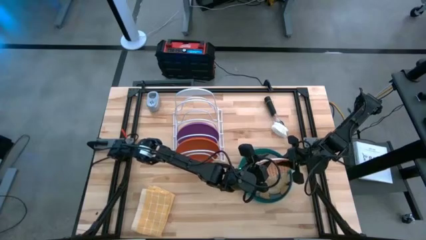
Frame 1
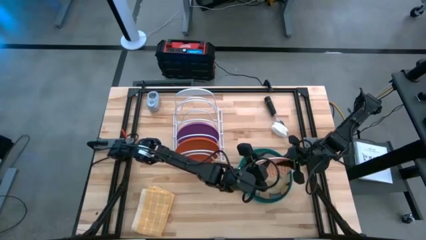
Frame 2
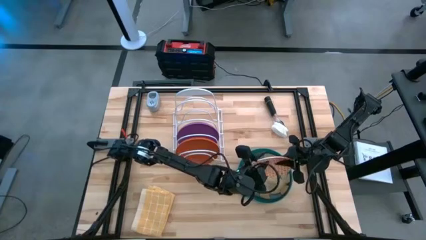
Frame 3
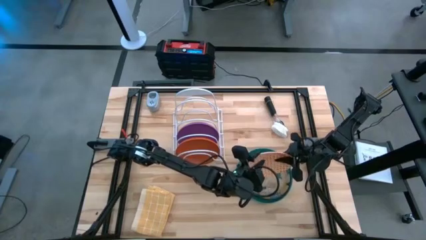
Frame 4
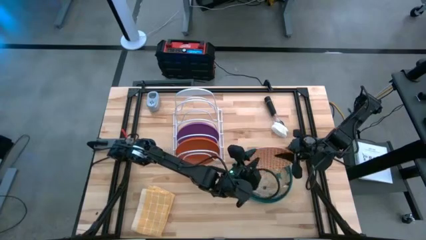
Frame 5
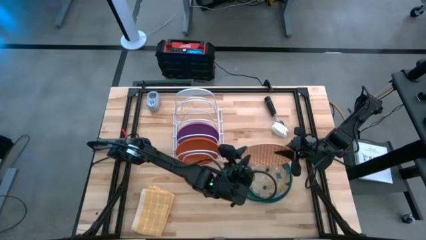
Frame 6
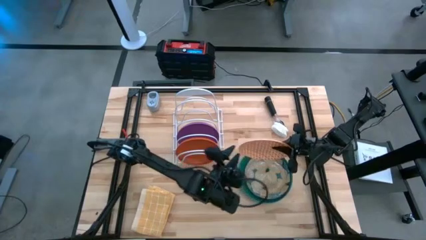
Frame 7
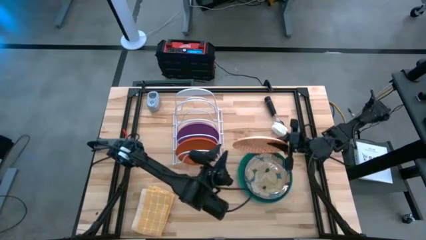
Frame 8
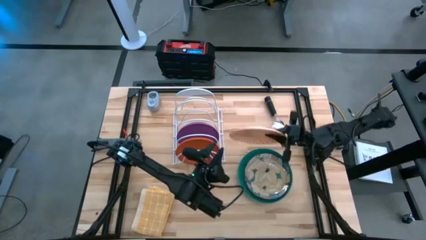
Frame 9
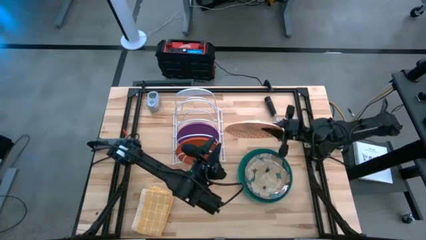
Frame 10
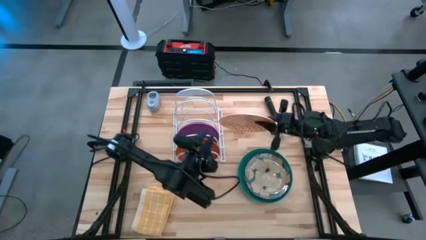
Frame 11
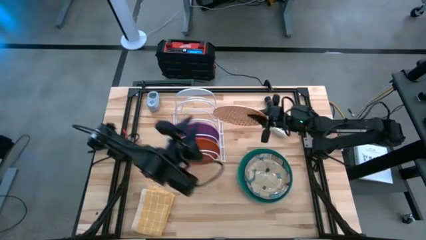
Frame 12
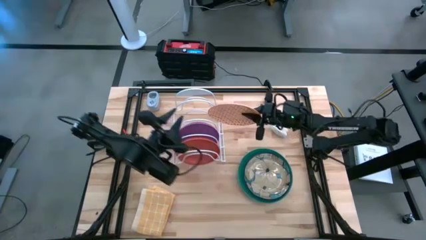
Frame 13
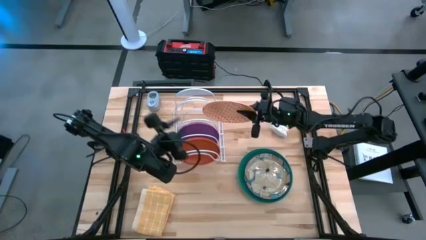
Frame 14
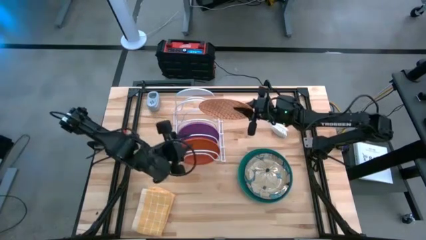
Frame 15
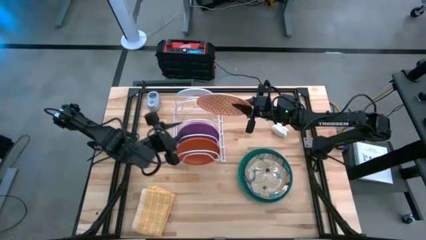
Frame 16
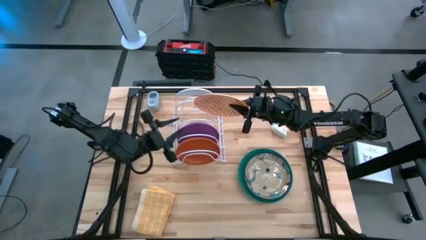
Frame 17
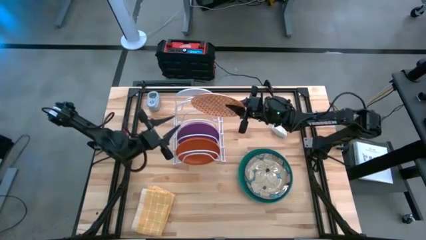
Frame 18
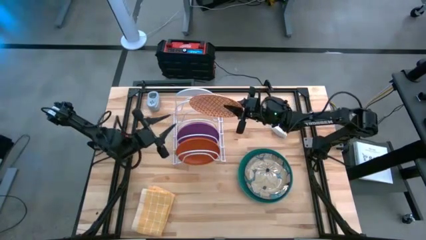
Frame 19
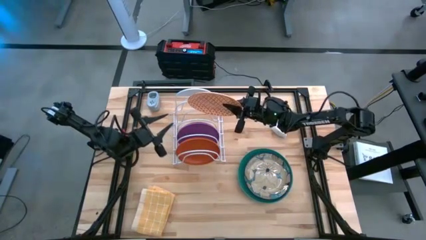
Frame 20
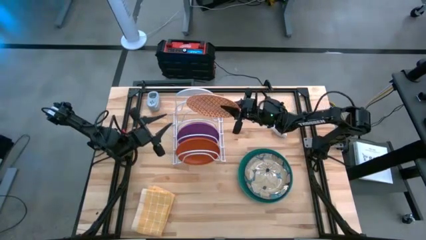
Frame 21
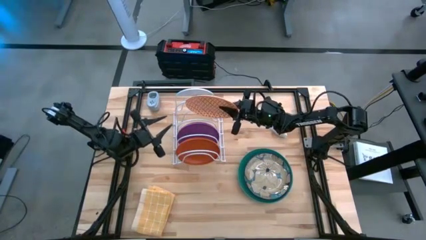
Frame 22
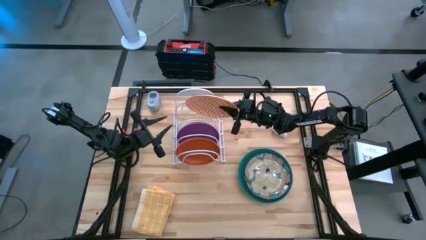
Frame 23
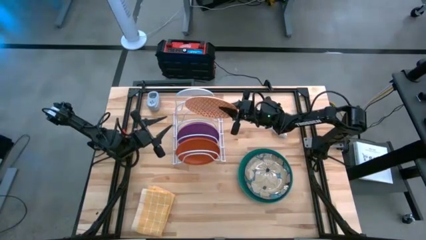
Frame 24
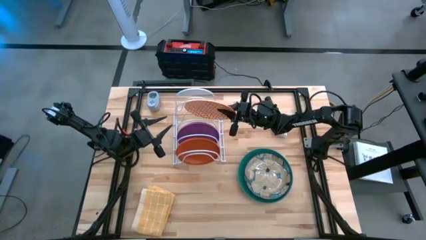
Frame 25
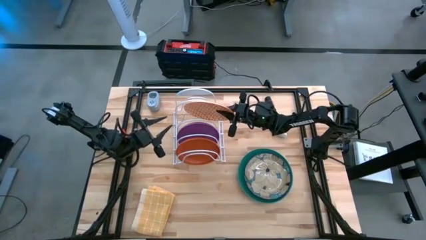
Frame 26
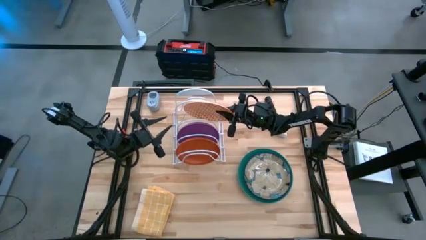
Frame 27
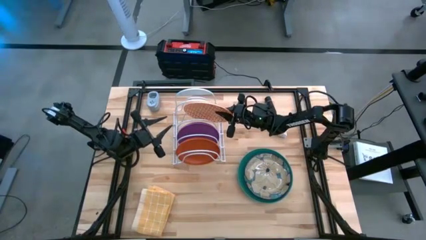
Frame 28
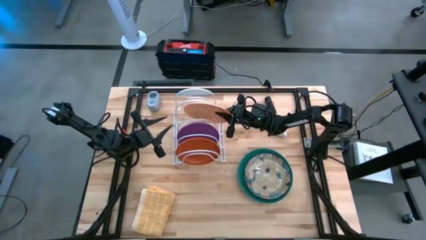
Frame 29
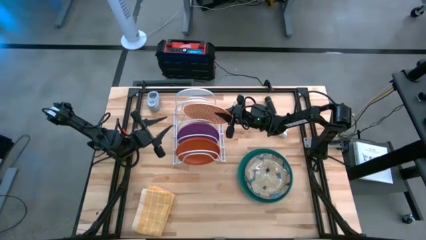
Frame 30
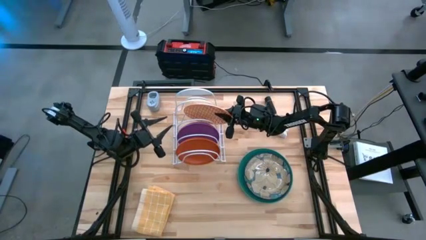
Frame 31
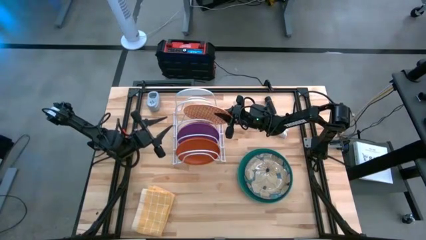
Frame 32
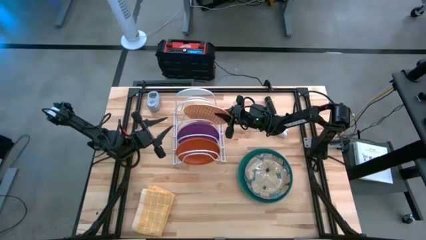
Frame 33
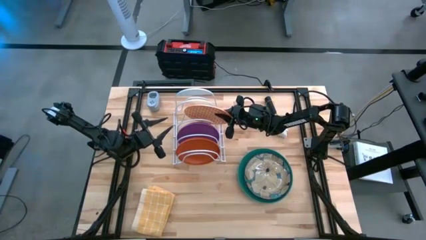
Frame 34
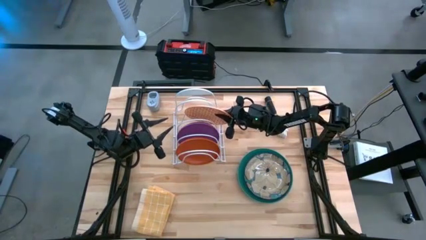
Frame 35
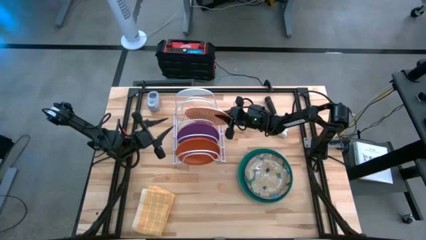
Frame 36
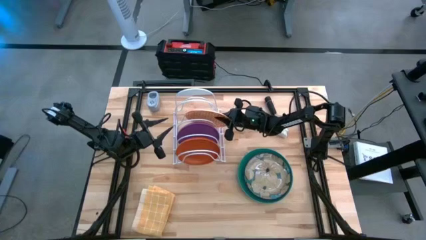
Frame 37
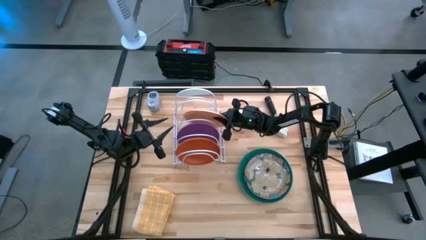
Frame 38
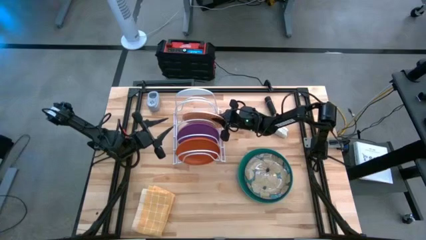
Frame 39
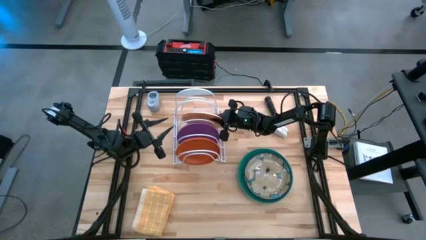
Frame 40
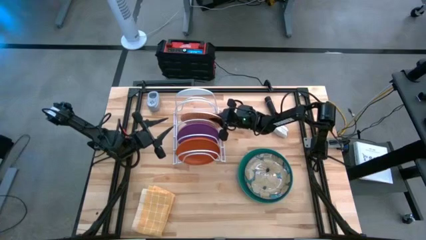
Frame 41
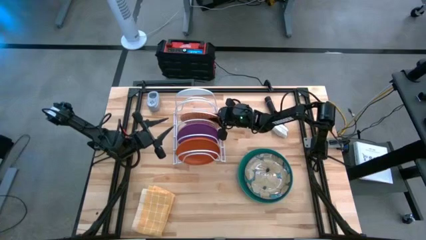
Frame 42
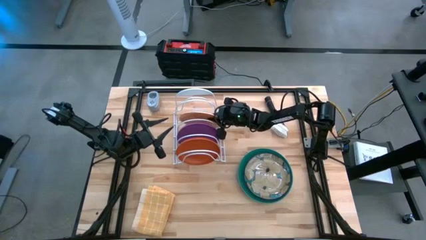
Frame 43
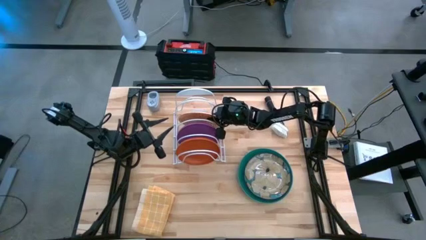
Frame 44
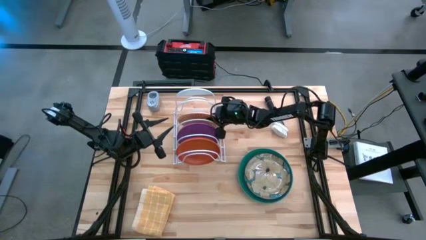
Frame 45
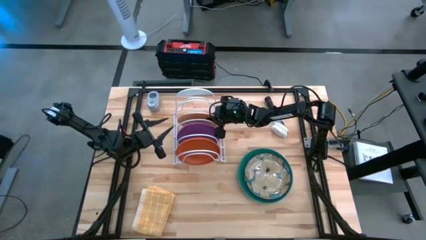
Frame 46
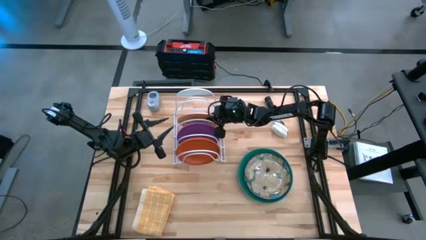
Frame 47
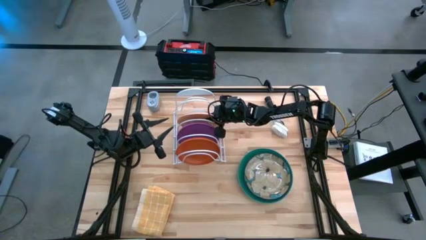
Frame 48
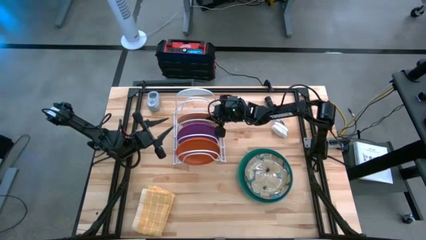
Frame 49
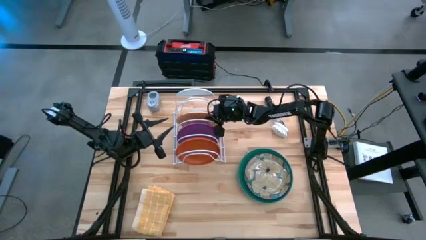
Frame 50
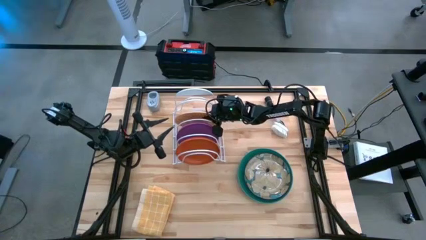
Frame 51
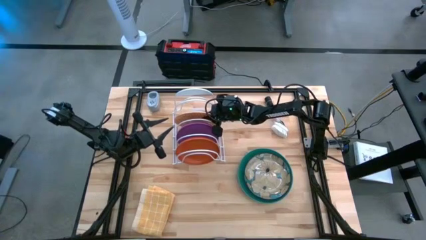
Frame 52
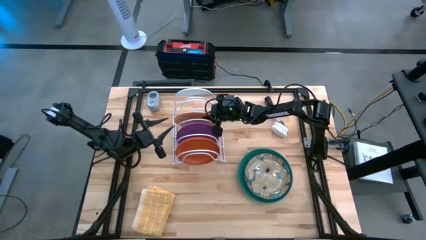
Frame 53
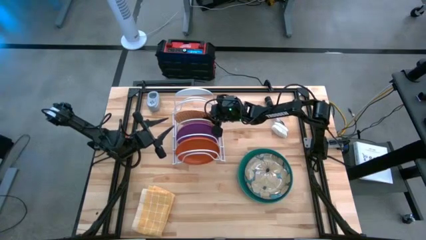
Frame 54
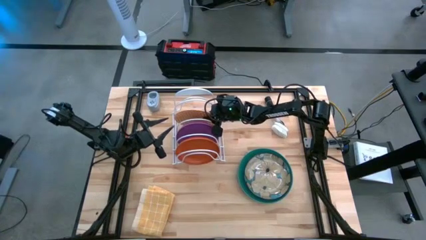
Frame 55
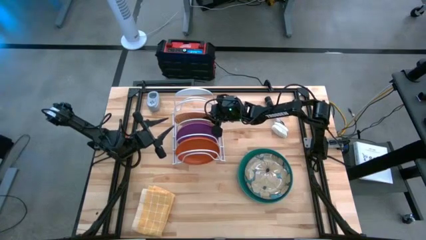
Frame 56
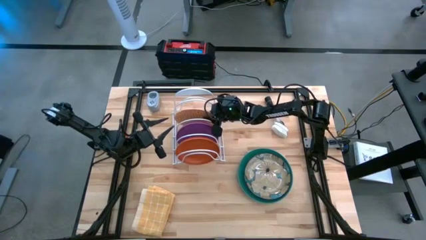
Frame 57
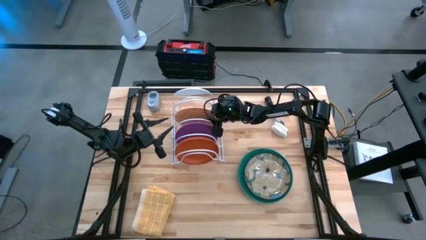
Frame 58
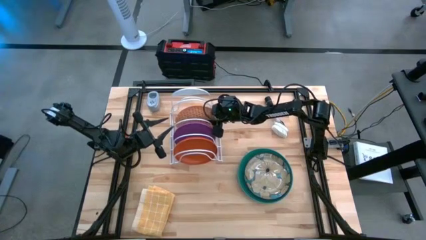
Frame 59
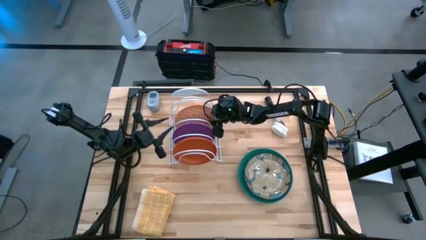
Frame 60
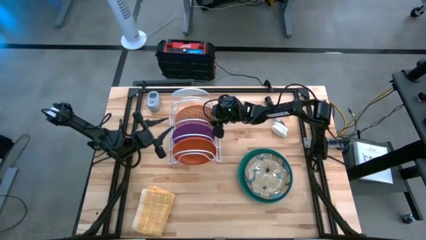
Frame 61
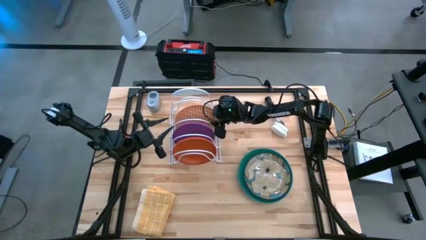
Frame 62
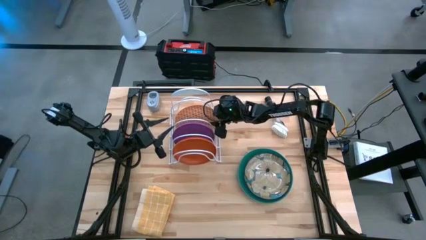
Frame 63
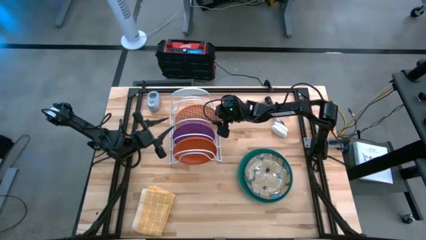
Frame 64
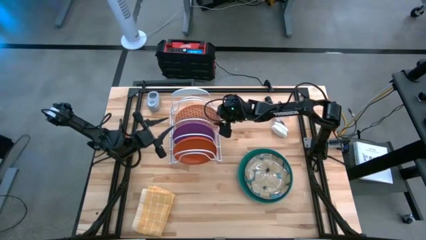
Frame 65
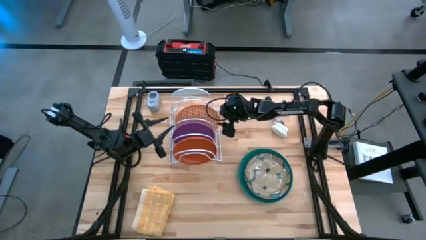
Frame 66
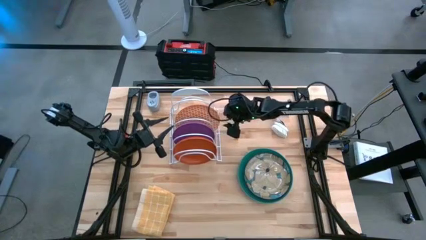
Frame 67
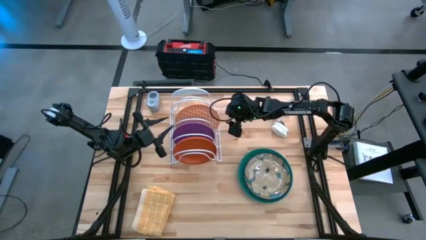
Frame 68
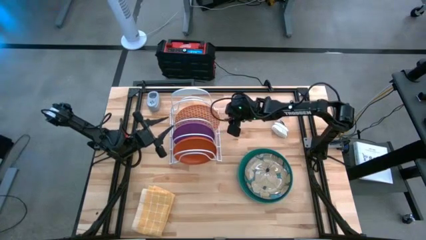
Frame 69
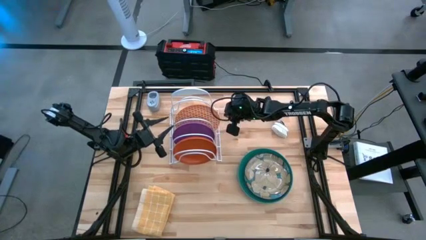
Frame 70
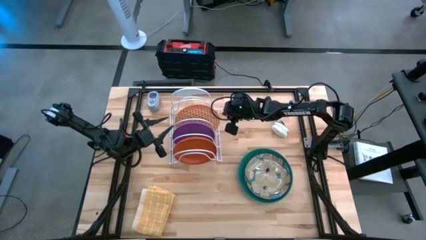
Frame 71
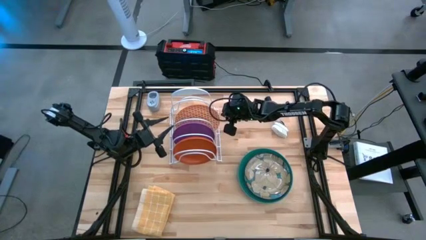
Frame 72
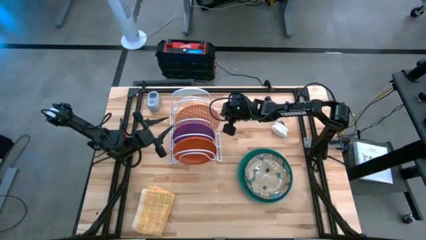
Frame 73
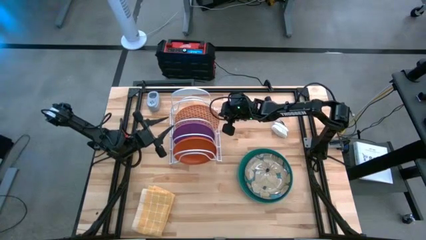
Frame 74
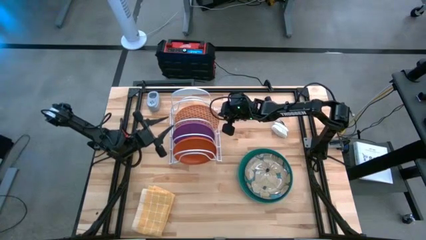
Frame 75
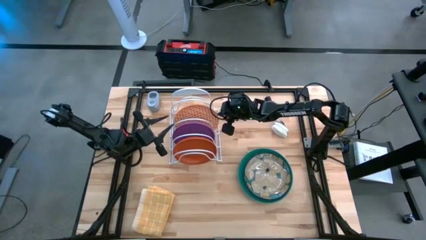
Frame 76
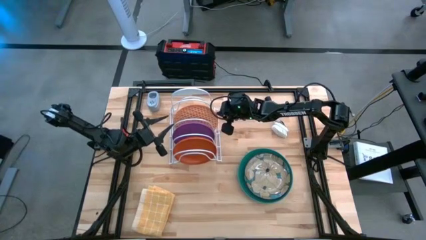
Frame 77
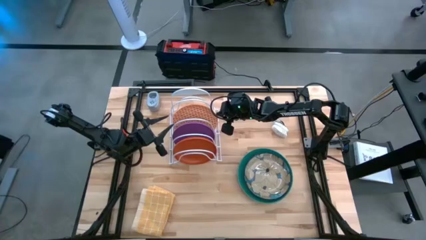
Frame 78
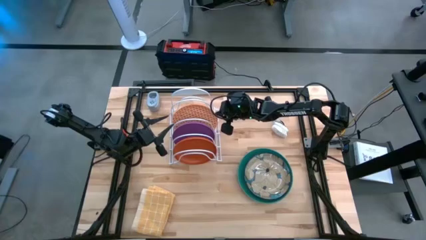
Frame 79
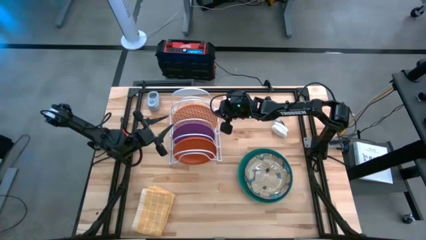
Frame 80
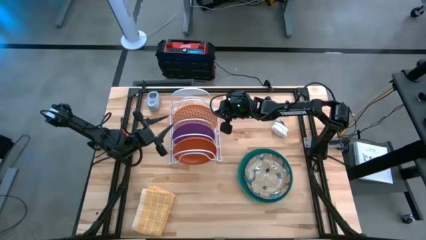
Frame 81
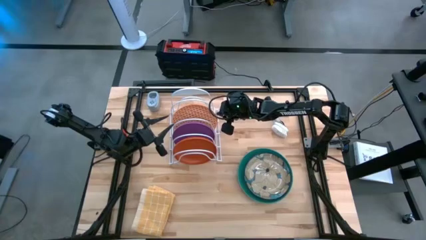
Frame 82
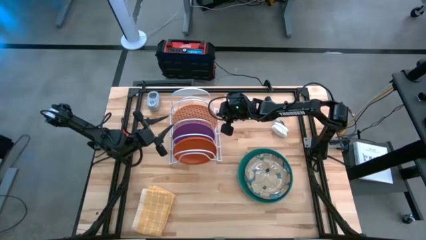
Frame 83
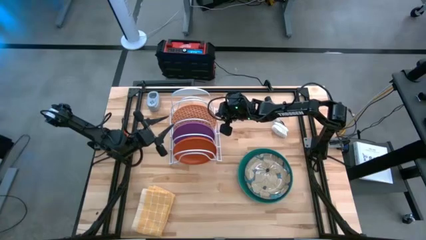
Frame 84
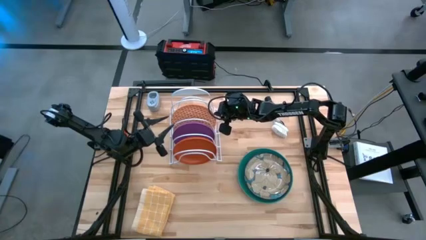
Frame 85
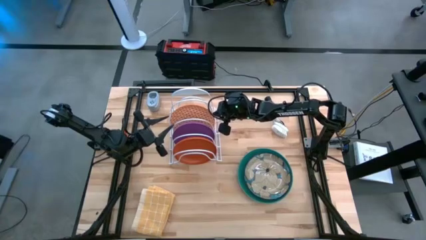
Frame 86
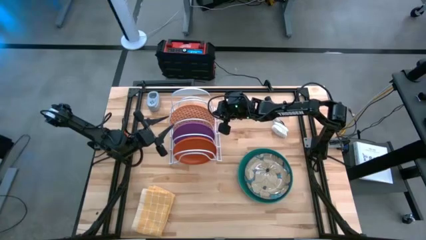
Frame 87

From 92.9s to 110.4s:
Task: Sort dishes
Put the orange/white plate into the dish rack
